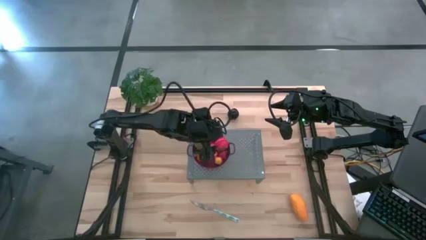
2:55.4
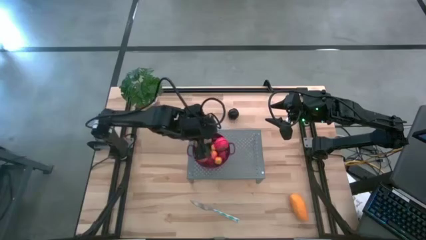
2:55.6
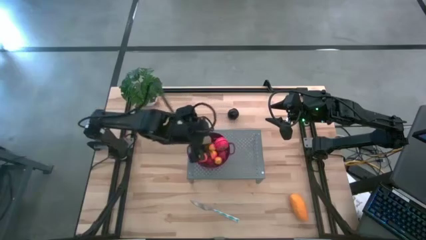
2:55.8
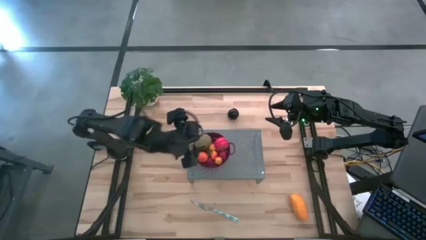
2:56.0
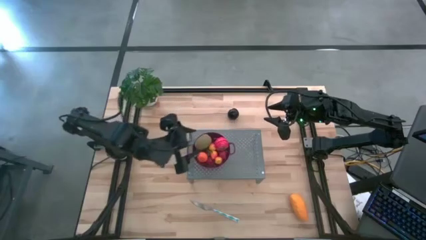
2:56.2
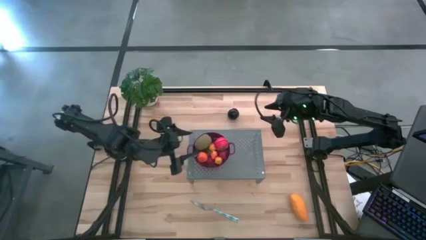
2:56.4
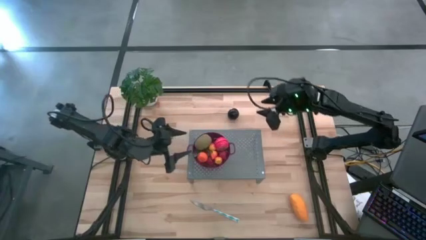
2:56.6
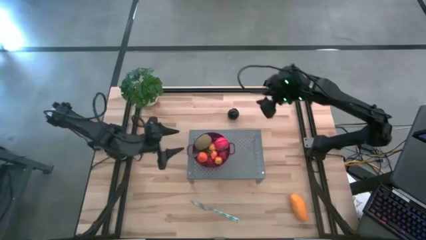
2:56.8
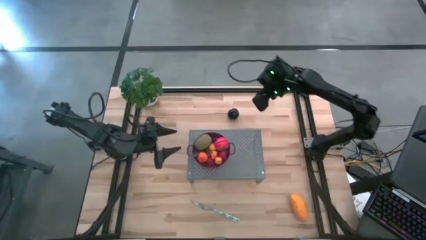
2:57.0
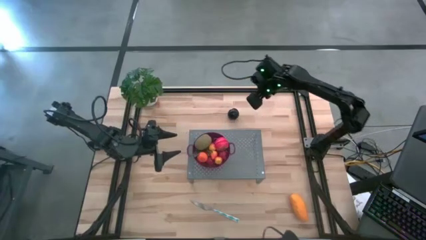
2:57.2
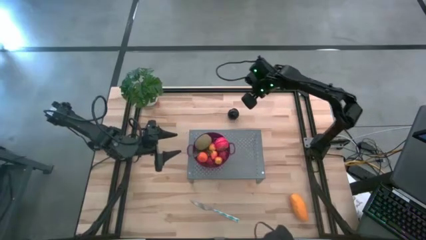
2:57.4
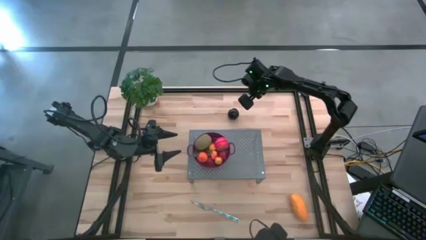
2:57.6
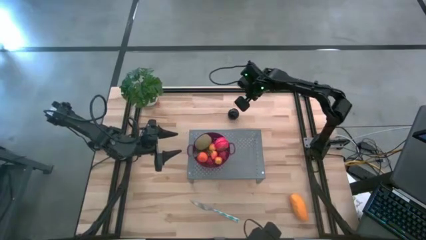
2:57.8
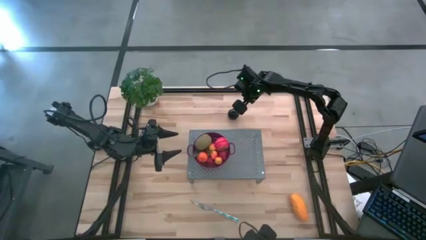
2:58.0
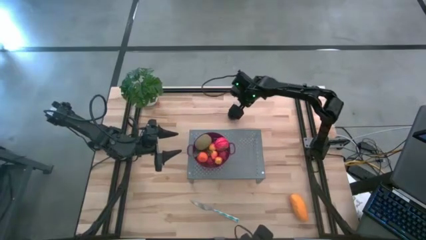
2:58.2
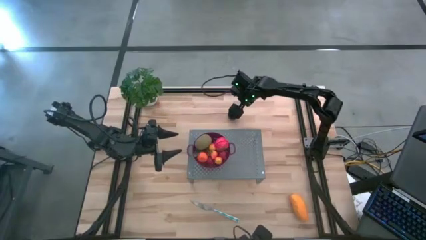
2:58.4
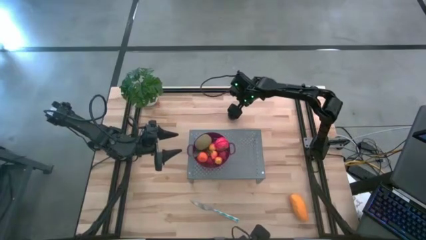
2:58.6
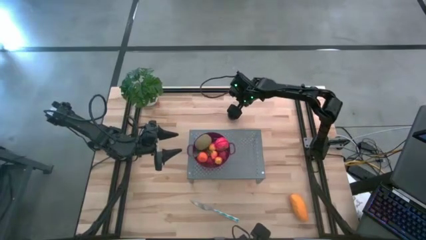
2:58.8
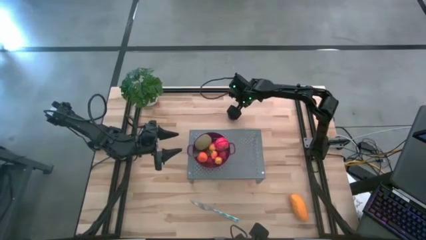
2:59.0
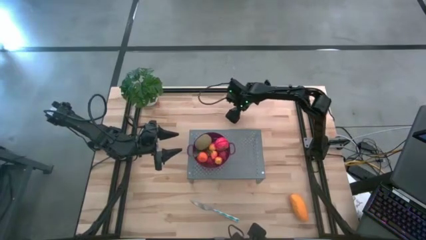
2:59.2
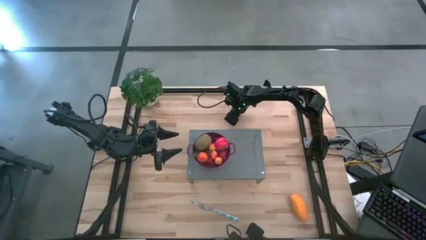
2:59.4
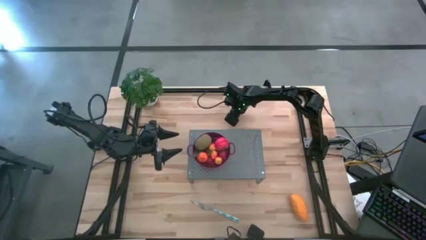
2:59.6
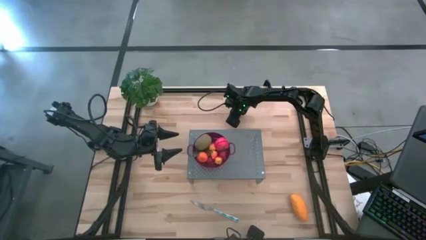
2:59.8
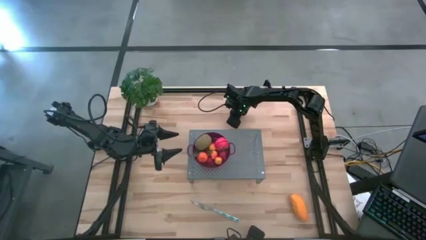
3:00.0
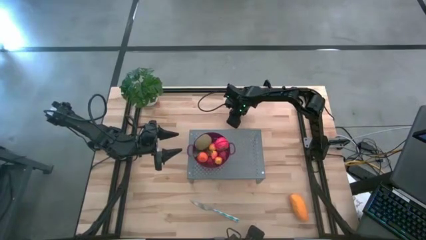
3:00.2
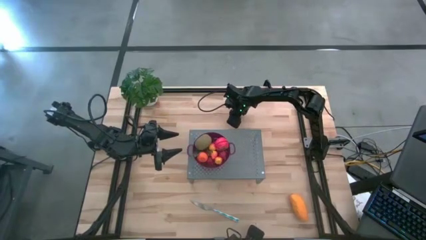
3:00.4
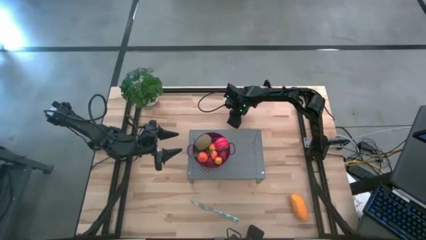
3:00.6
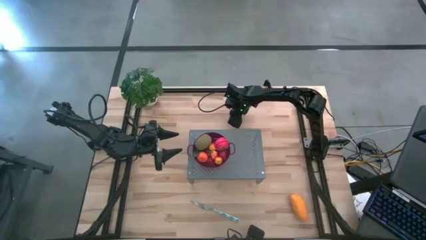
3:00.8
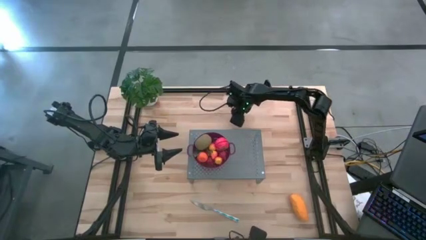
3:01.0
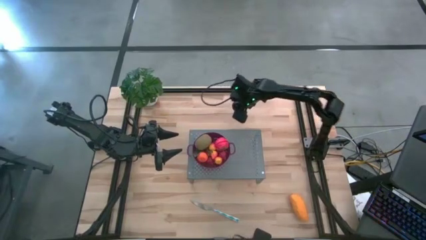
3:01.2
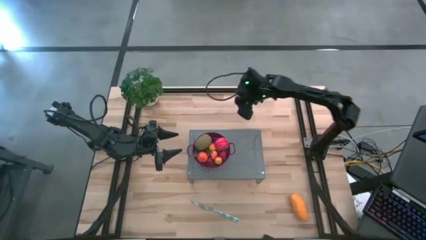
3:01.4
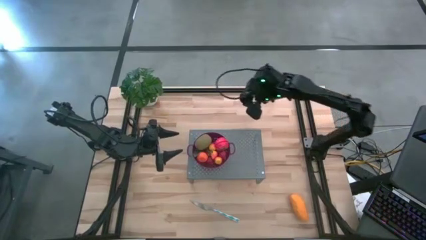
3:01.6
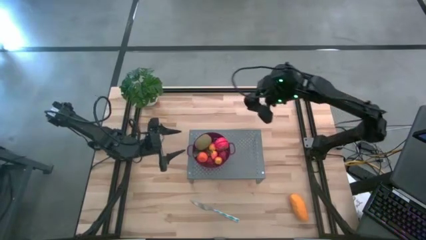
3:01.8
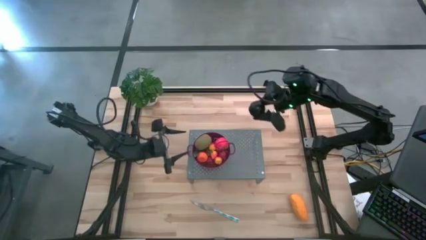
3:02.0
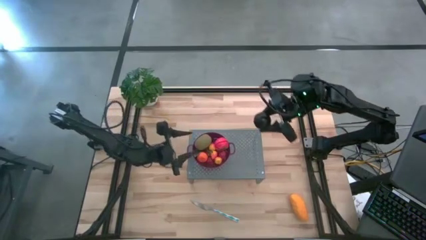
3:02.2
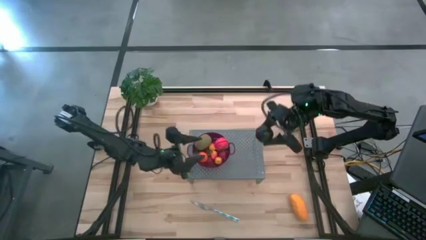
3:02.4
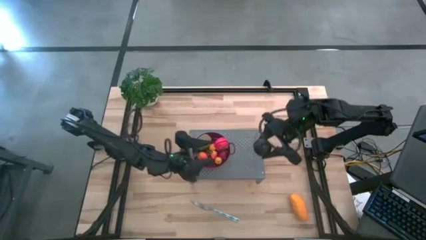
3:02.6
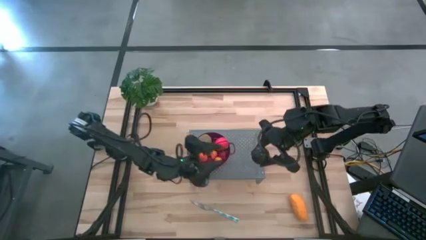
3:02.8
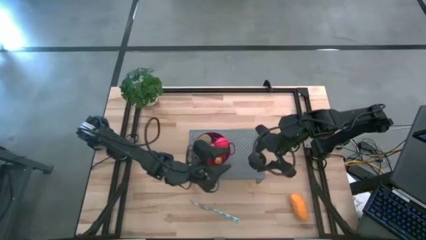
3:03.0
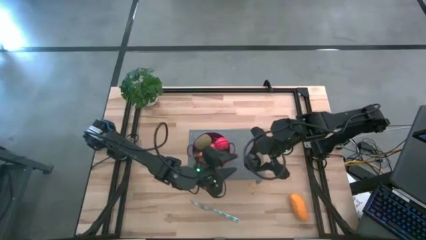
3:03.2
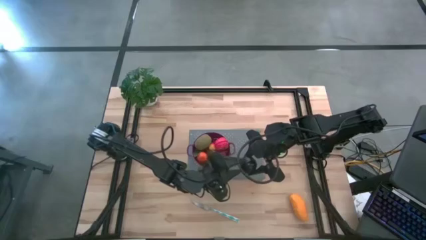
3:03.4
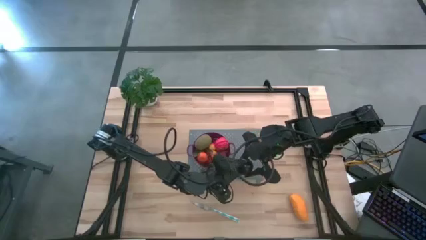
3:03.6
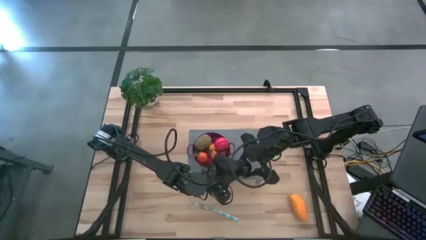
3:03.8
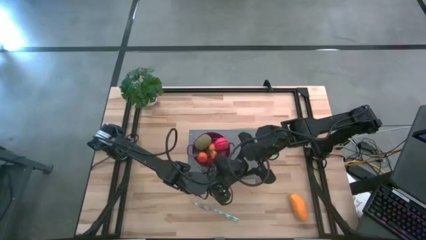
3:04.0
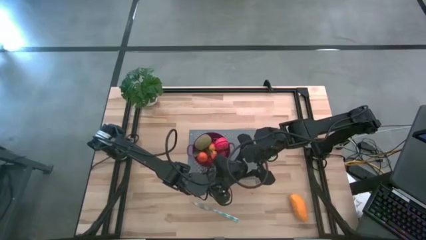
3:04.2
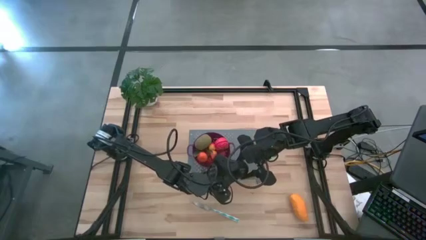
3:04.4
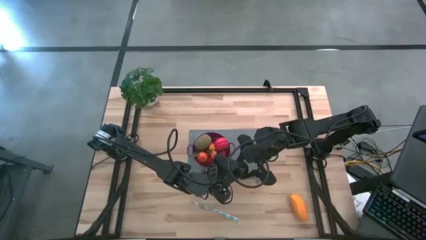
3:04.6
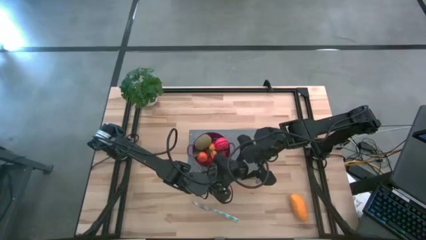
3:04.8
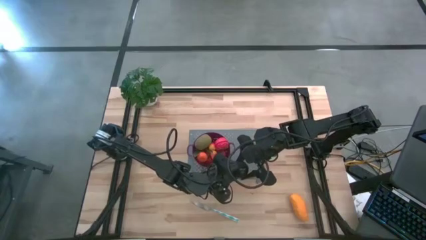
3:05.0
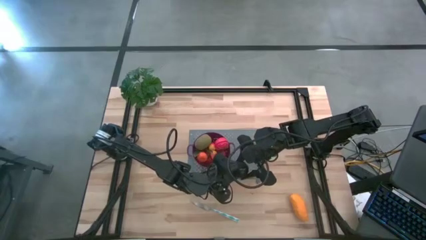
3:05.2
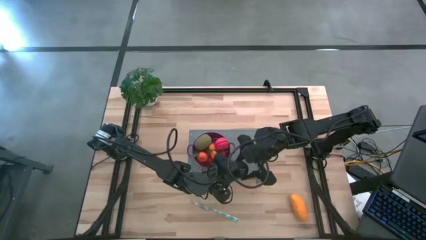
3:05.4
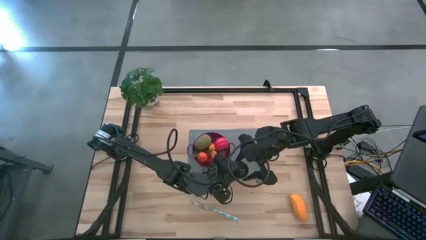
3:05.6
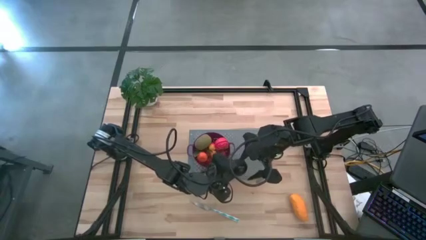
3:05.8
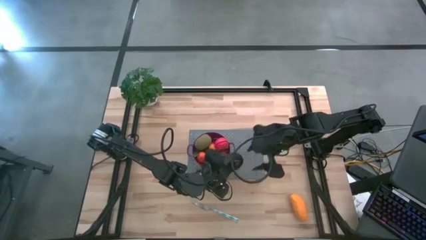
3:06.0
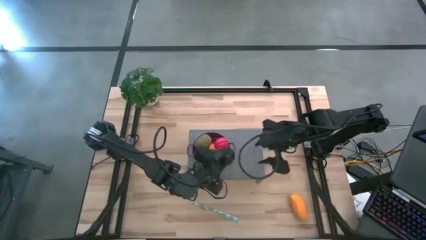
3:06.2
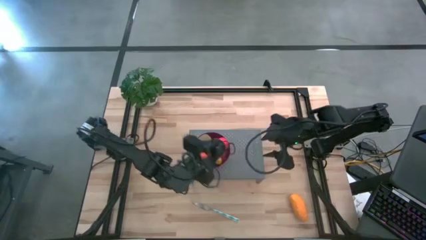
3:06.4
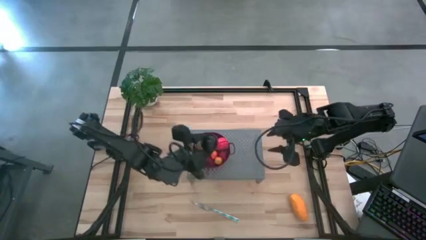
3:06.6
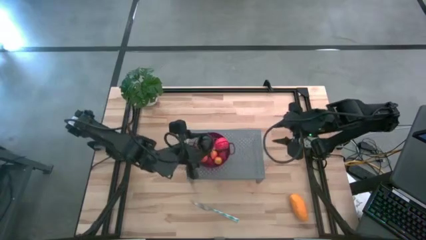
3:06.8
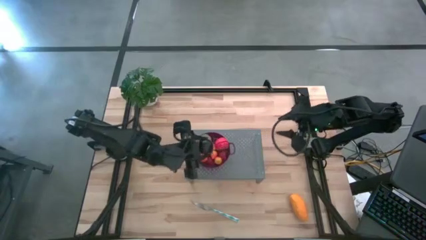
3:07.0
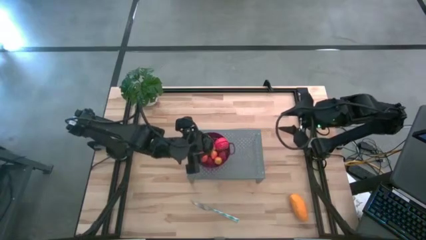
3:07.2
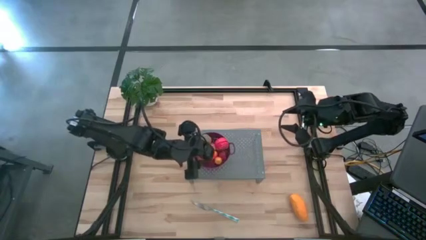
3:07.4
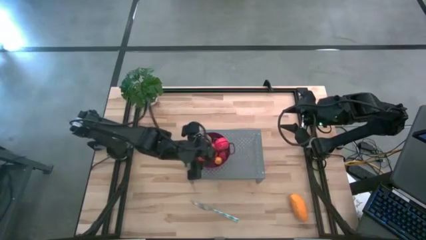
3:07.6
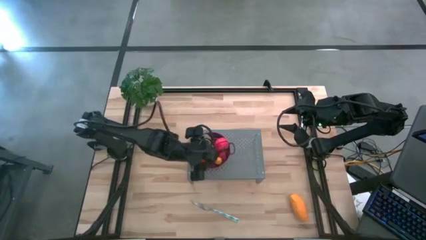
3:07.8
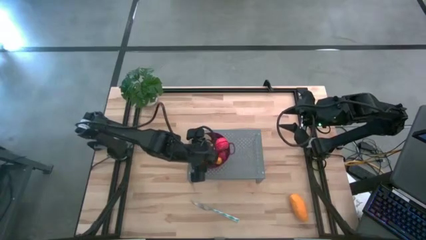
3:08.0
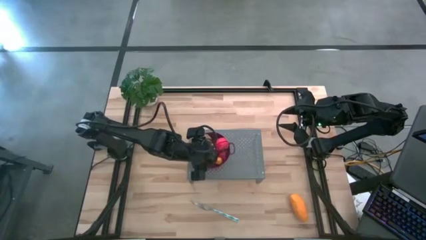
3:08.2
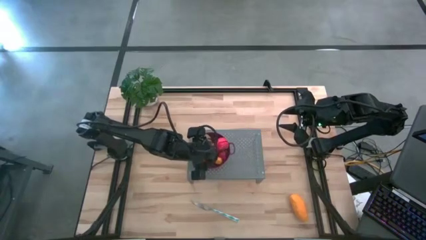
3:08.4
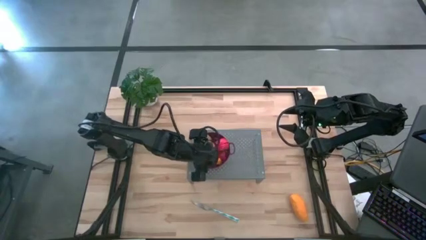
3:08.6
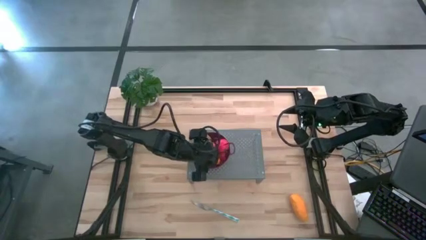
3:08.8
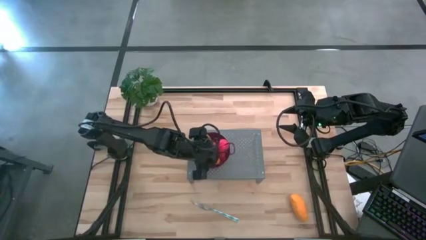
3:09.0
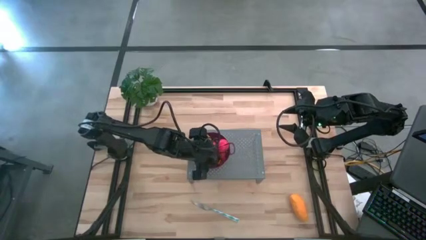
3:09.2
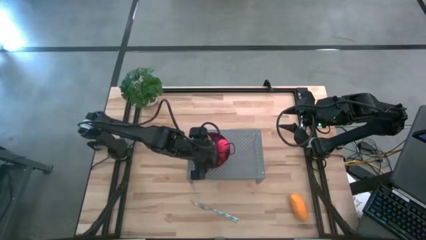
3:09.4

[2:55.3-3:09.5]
Task: Pick & Place Fruit
Put the plum into the purple strainer bowl

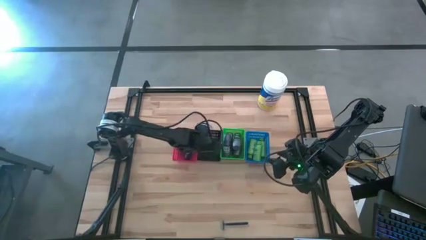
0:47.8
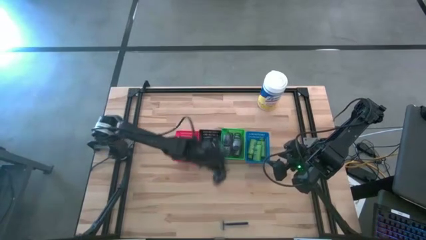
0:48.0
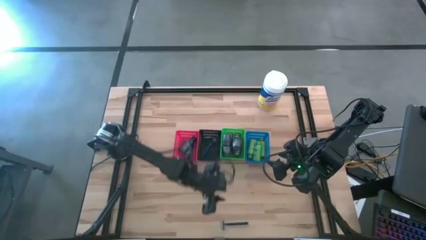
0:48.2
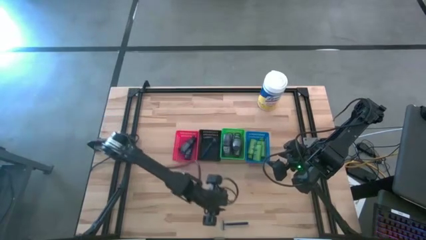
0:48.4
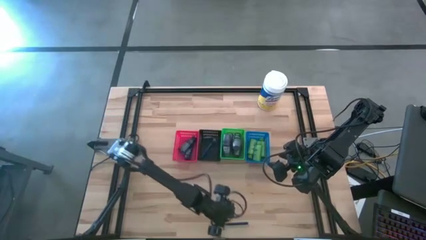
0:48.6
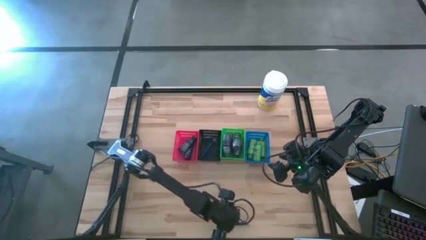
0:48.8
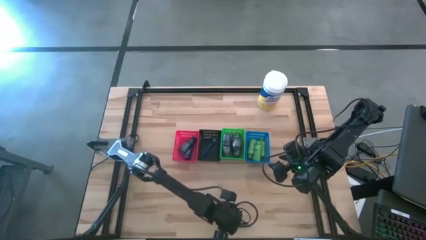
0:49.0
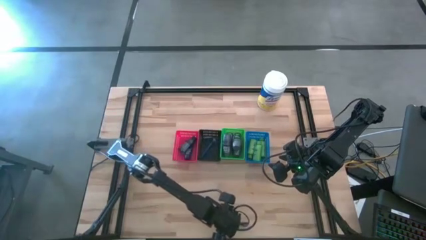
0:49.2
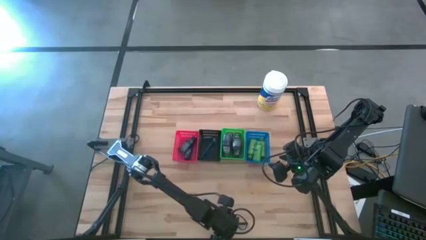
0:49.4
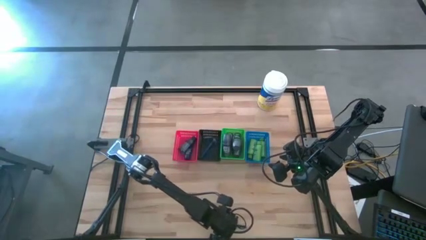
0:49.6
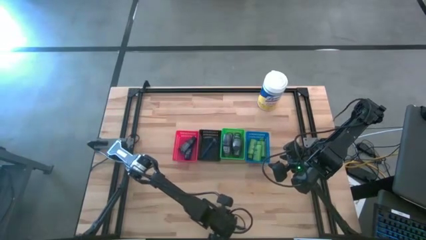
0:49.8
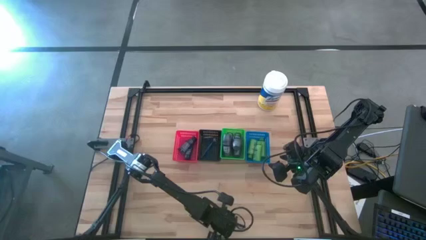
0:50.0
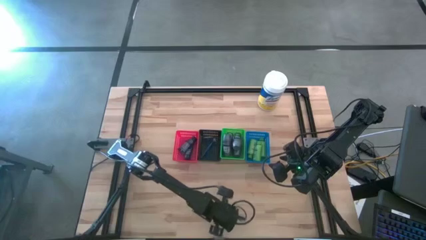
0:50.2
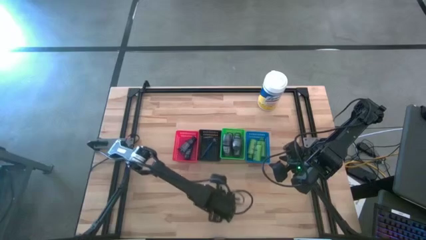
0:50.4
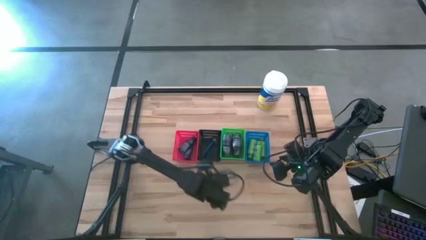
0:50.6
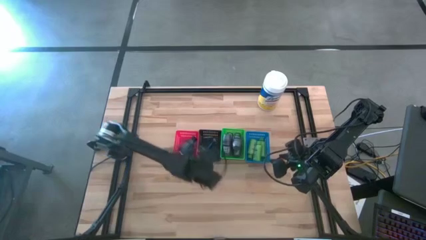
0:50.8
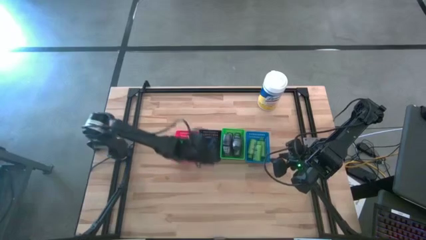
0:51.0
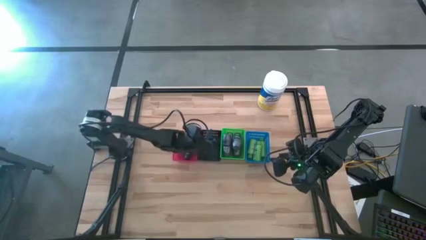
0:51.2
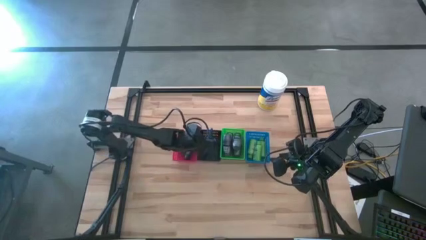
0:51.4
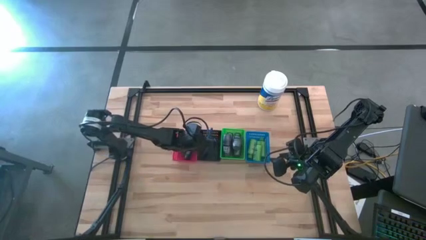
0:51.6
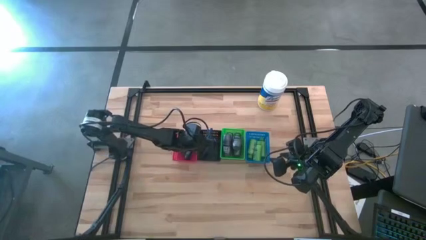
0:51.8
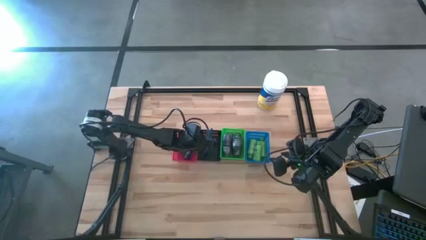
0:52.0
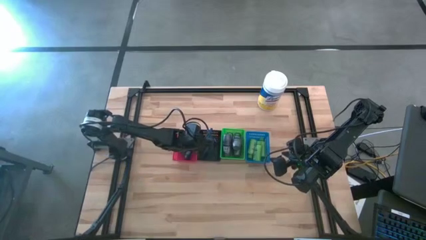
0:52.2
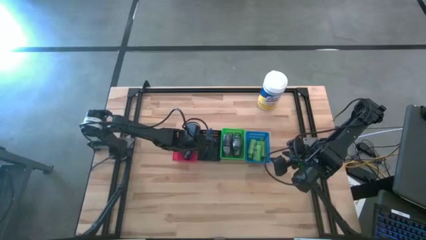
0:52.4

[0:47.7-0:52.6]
Task: Pick & Place Travel size toiletries
Put the blue razor into the black basket
